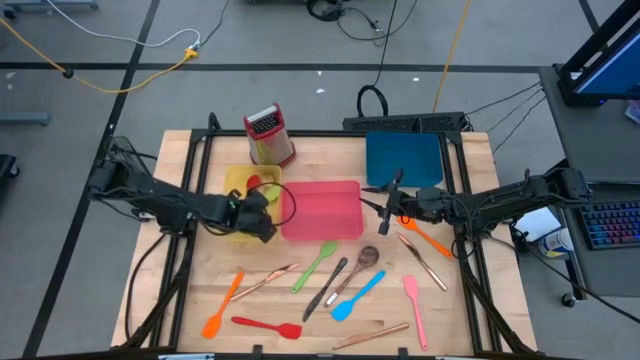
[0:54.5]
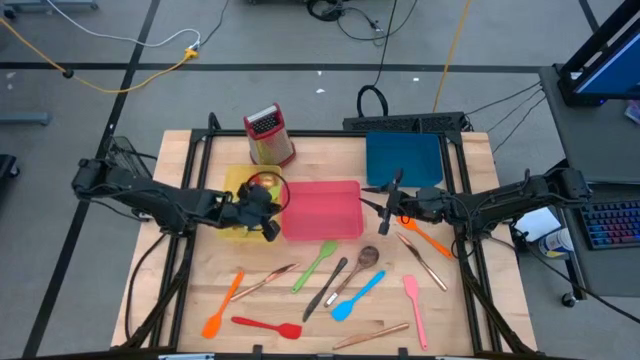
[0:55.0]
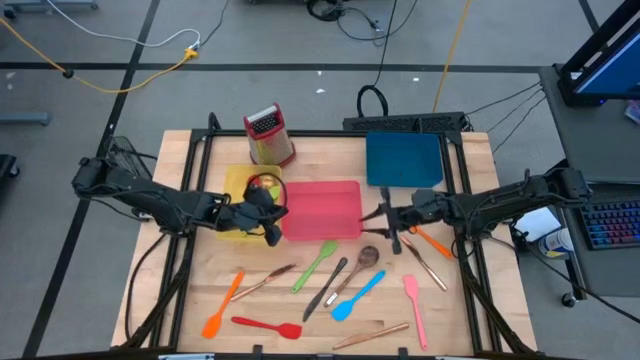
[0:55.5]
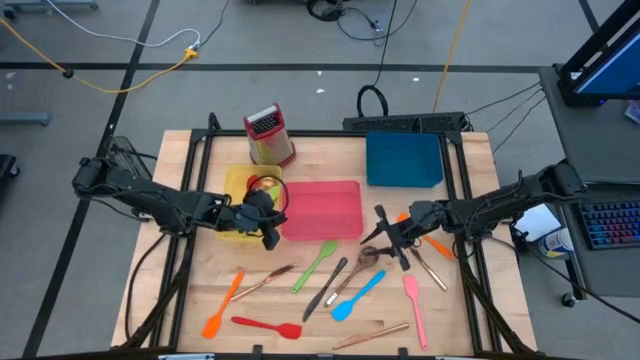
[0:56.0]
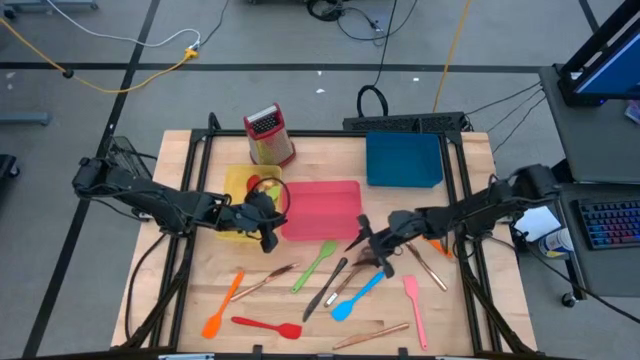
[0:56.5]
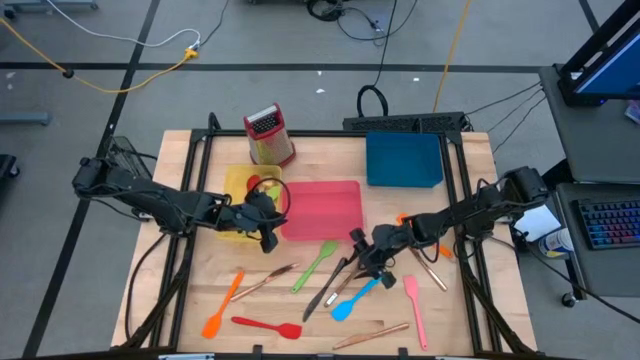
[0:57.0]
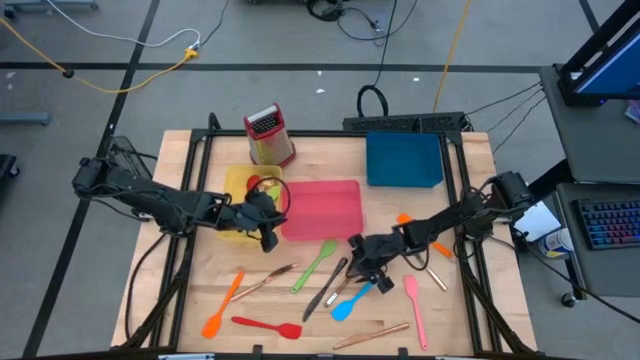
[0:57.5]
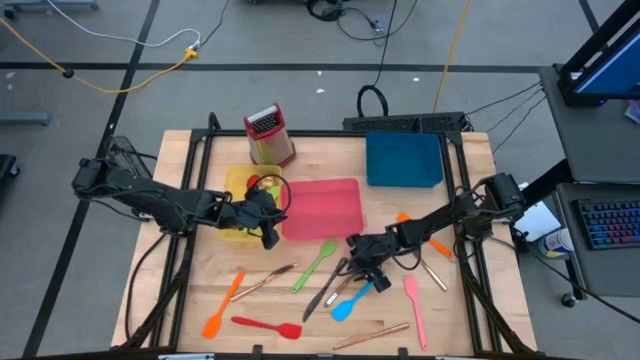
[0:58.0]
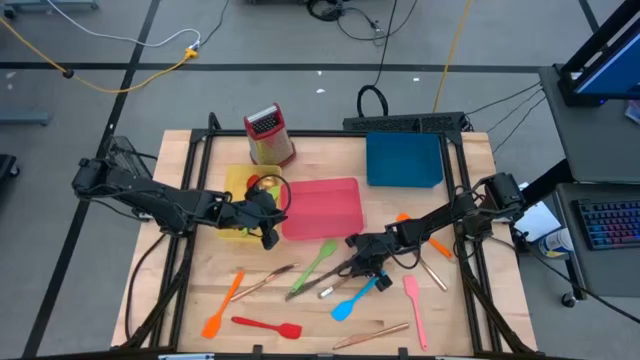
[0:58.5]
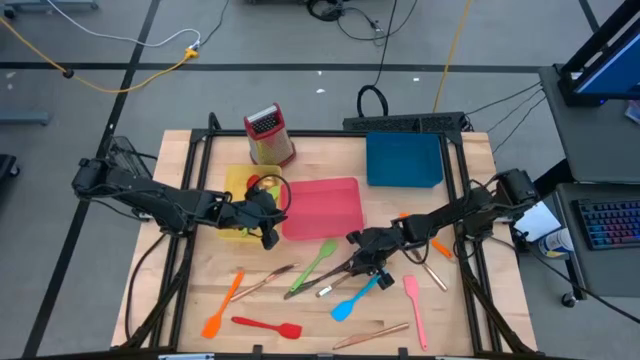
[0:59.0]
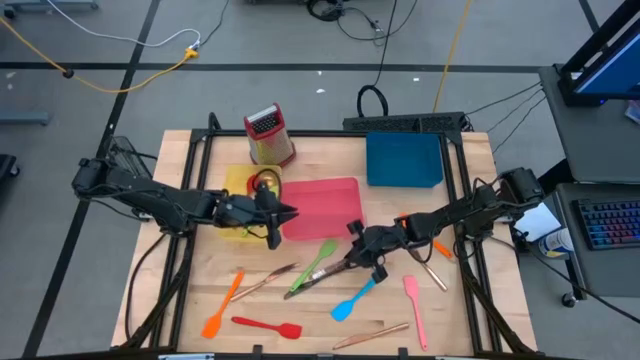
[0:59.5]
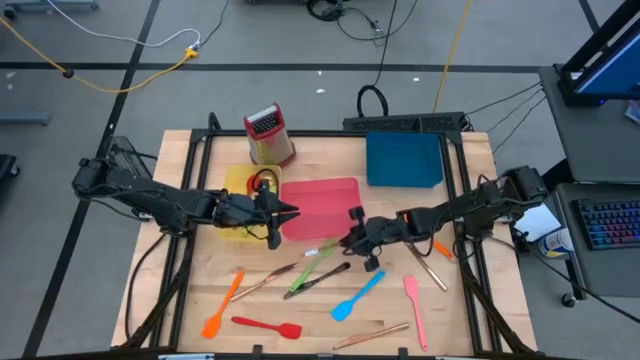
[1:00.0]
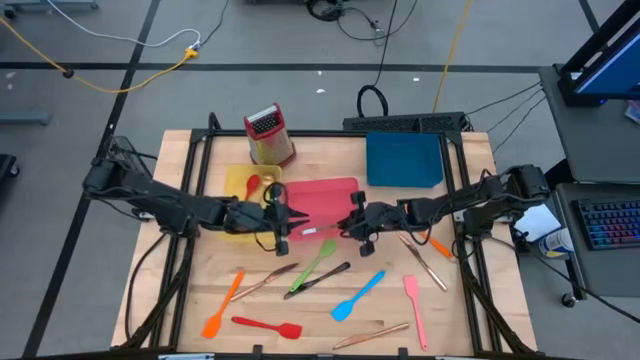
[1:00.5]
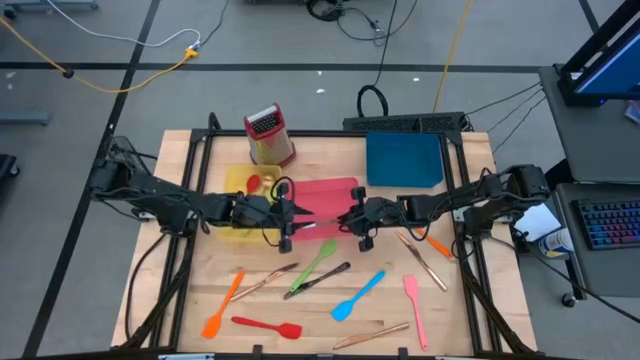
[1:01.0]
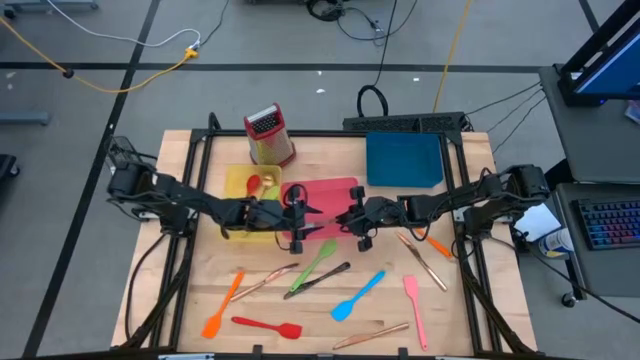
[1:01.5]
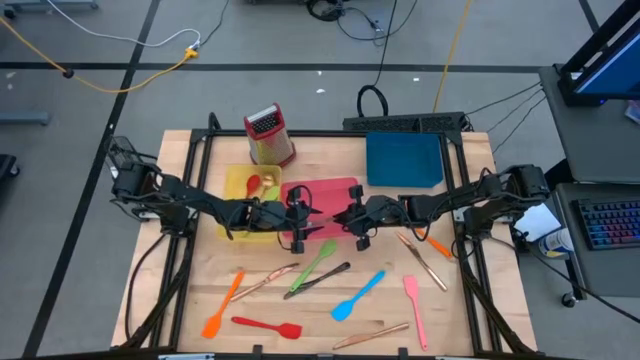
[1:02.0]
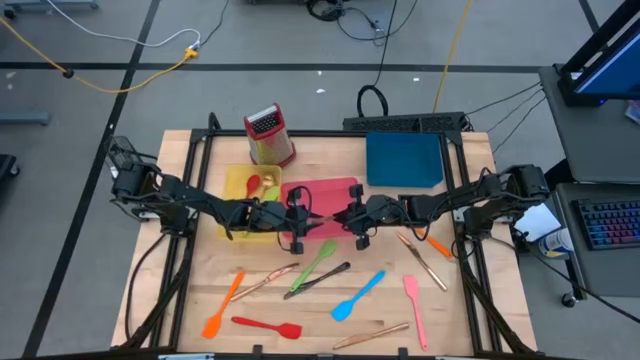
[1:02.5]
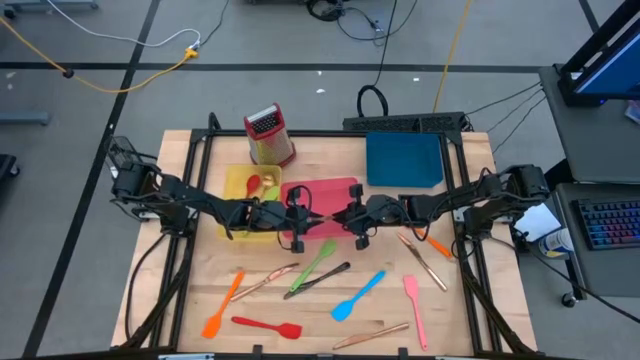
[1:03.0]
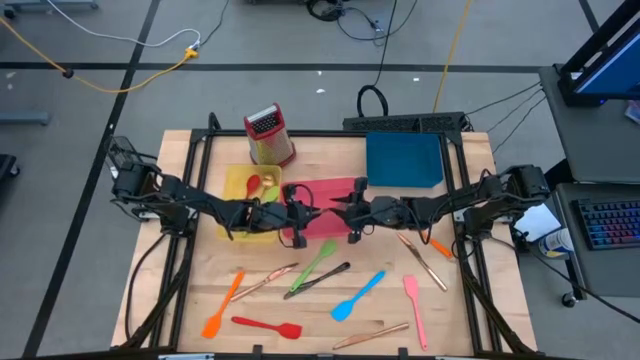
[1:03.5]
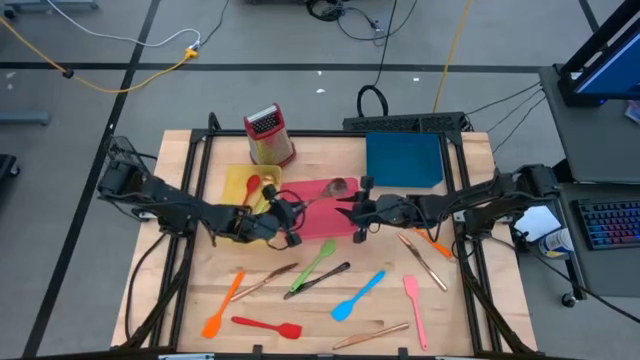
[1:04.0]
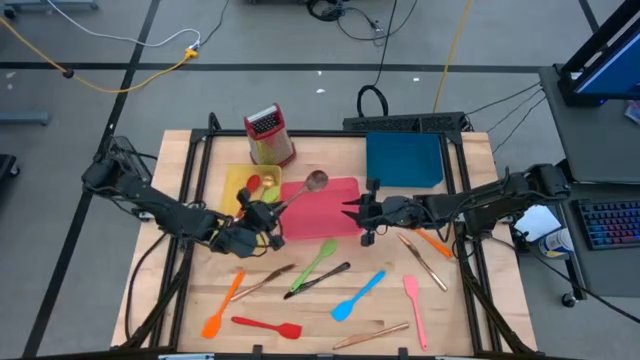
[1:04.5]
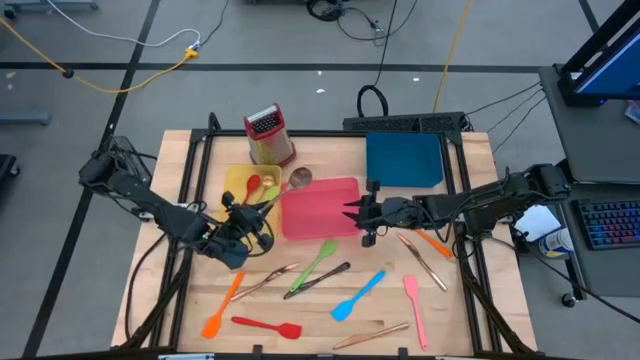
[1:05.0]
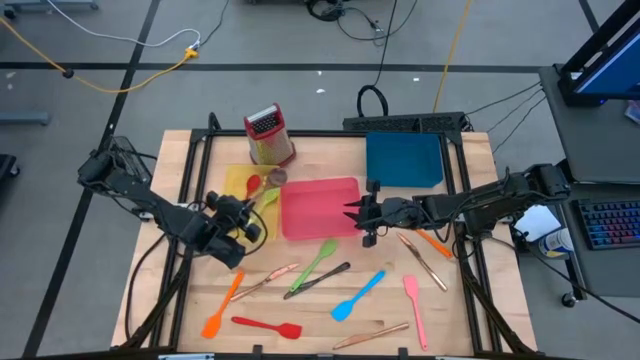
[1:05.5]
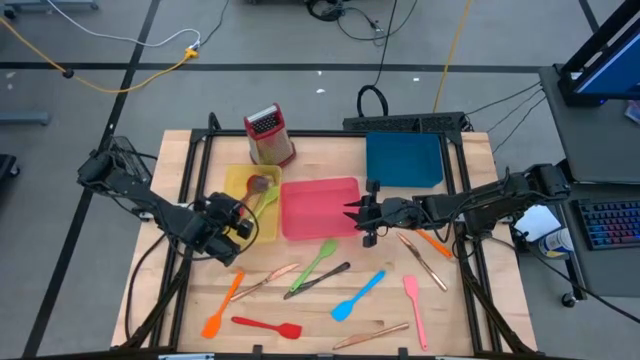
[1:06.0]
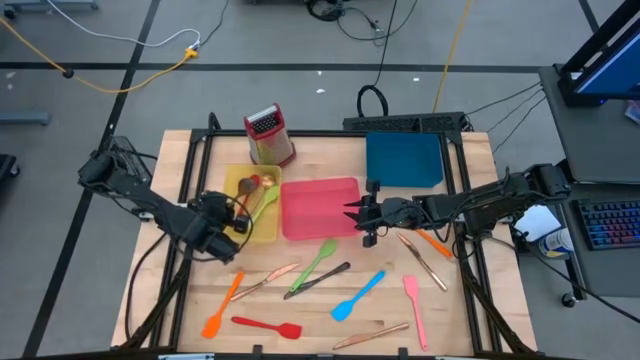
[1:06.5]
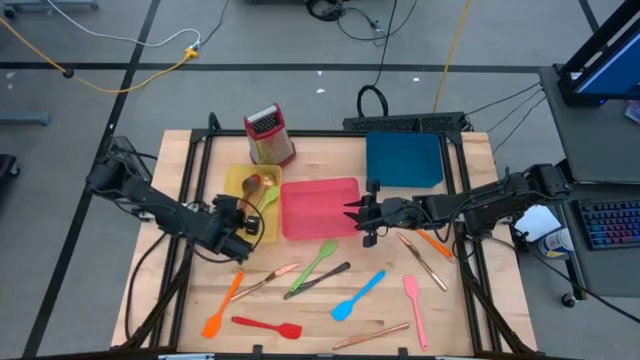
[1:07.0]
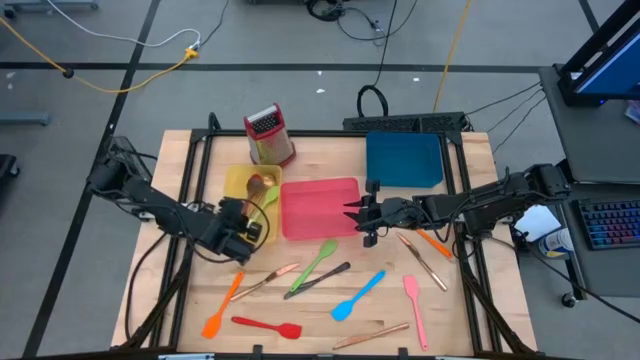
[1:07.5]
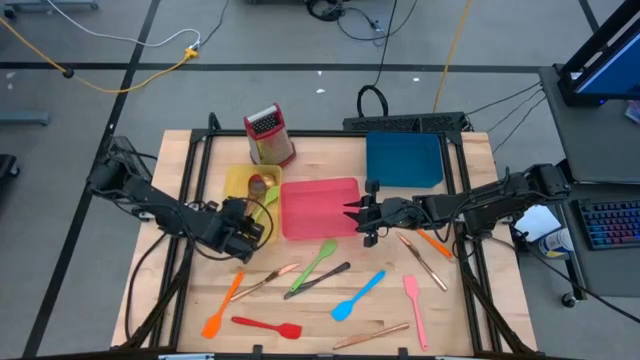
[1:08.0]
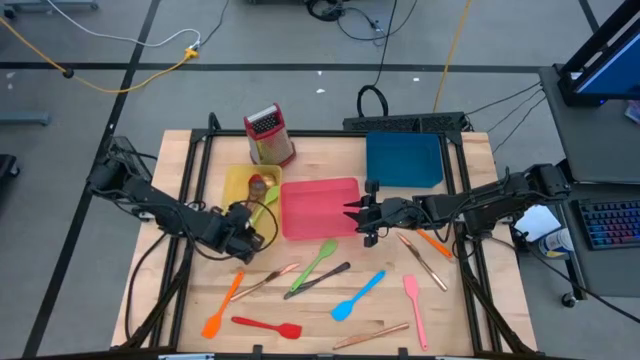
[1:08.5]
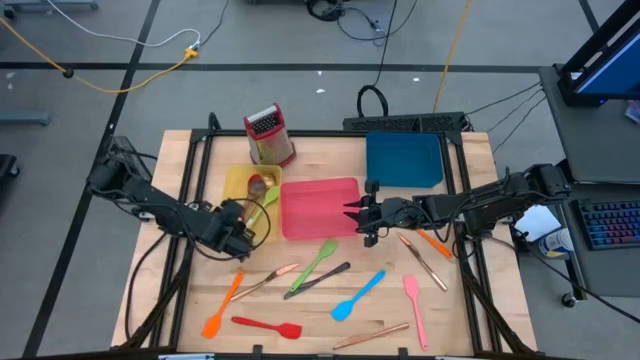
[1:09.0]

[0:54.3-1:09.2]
Task: Pick & Place Kitchen Items
Put the brown serving spoon into the yellow bin

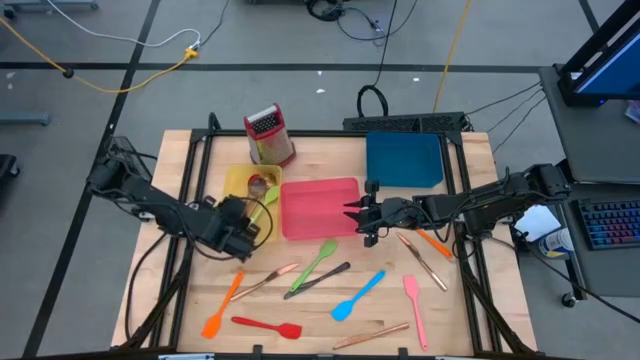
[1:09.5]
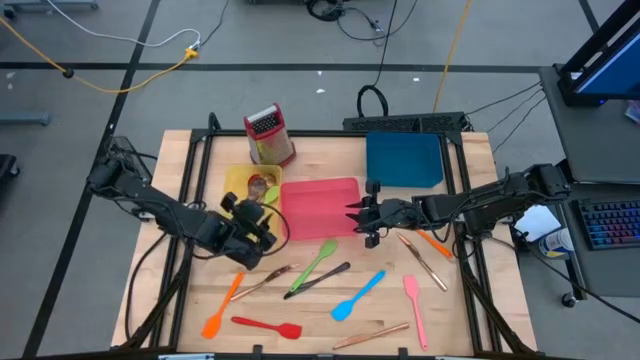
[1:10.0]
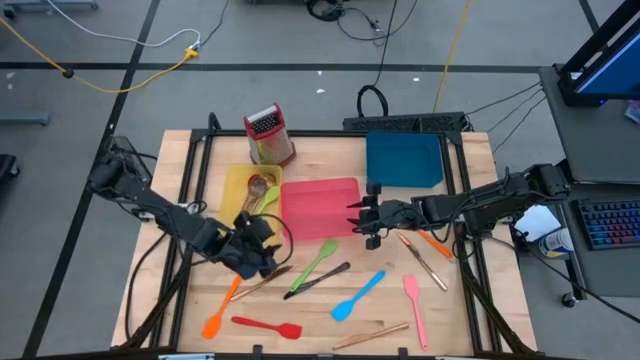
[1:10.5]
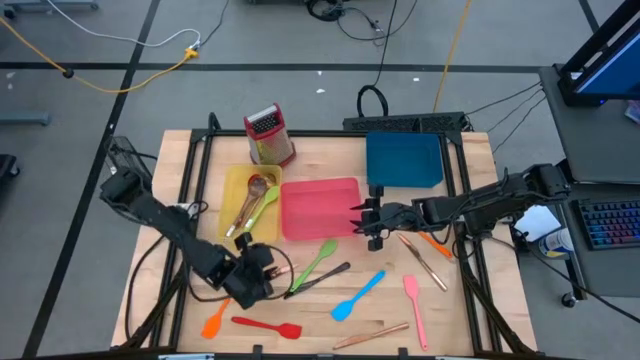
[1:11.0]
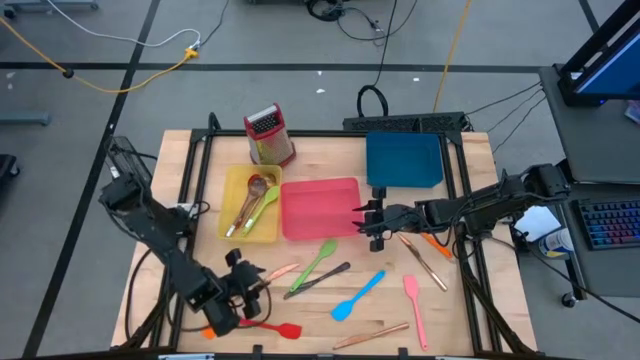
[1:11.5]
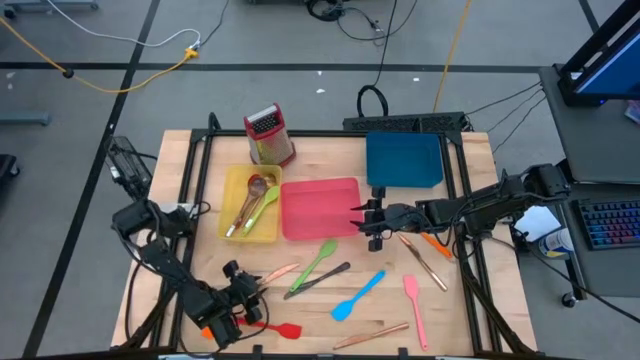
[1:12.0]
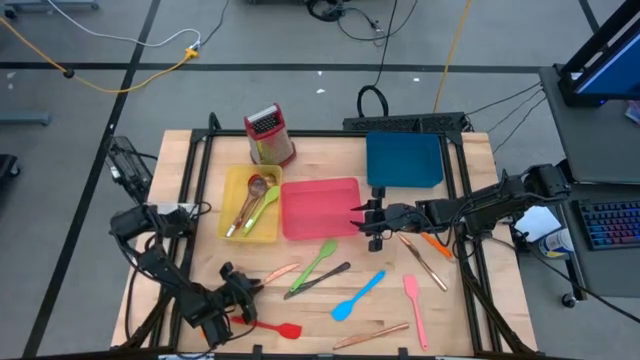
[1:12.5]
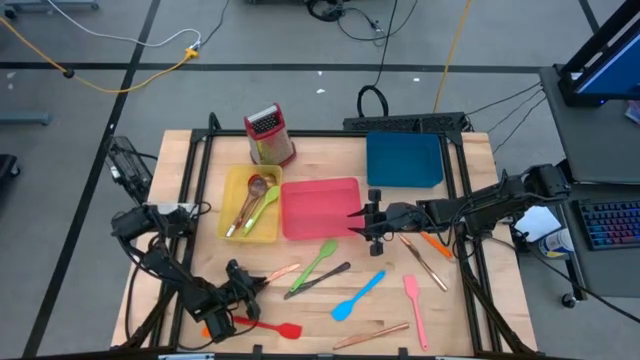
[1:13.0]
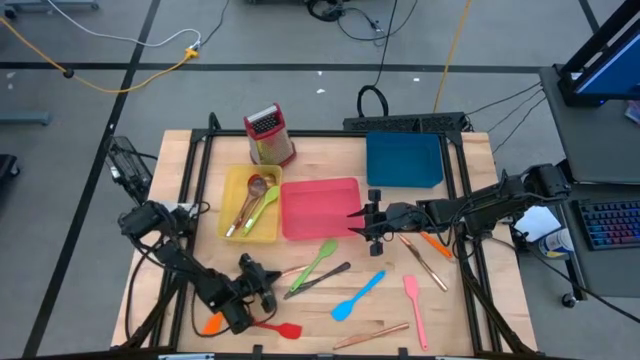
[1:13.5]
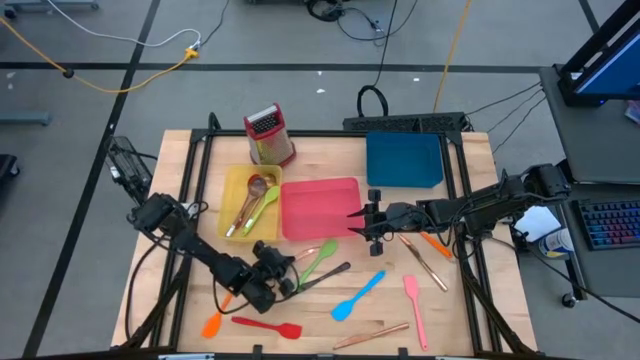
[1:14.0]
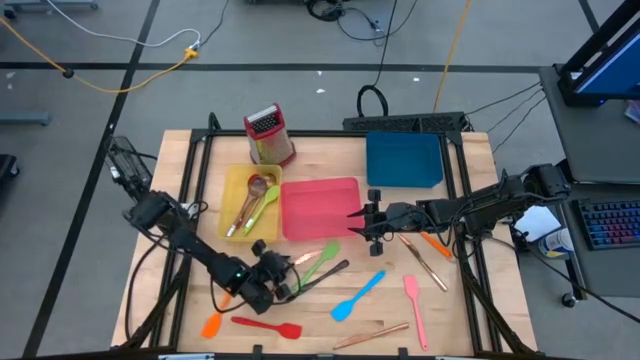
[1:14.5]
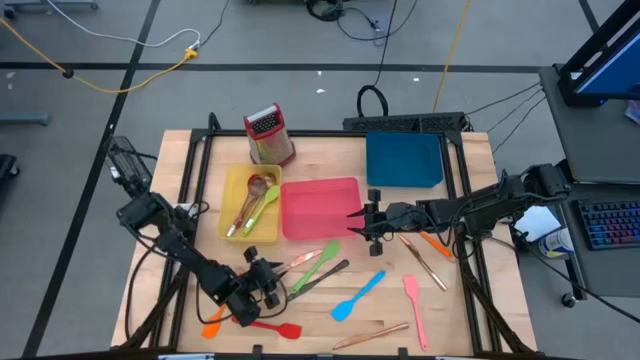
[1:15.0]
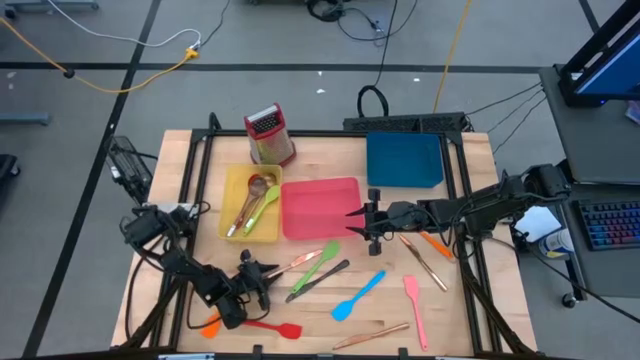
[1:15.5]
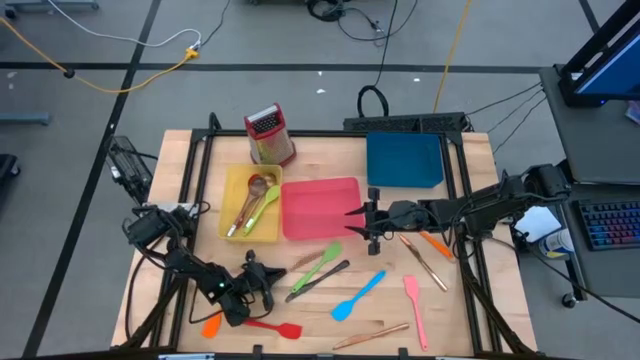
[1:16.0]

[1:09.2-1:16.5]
Put the left gold table knife into the pink bin
